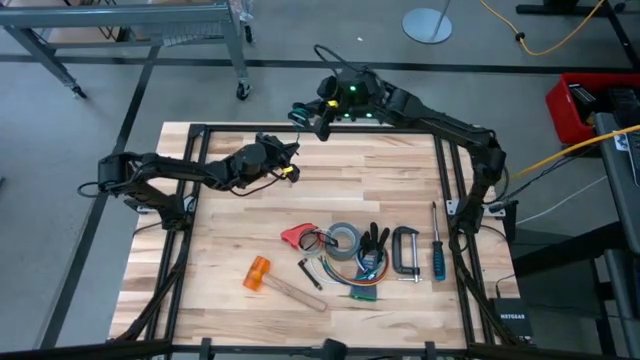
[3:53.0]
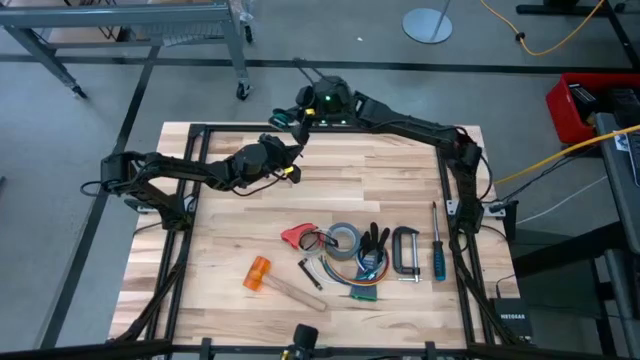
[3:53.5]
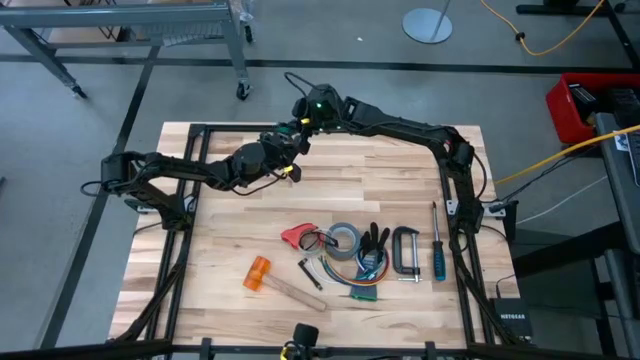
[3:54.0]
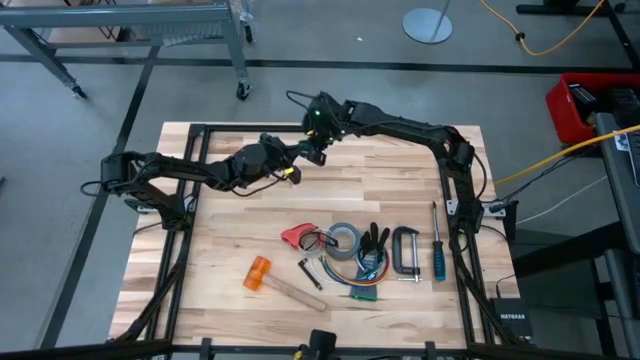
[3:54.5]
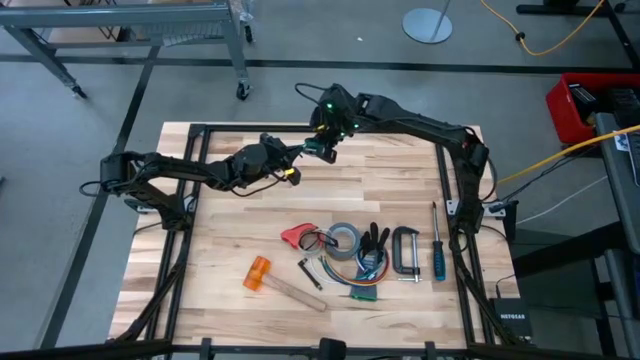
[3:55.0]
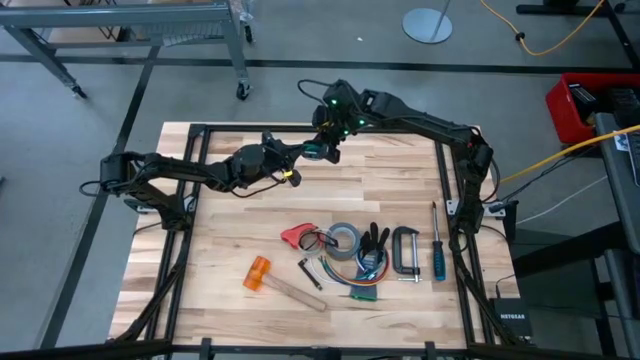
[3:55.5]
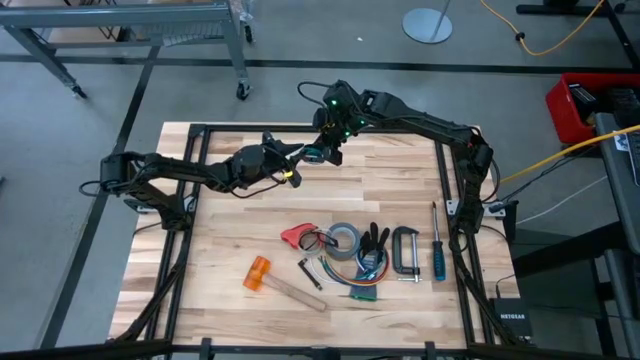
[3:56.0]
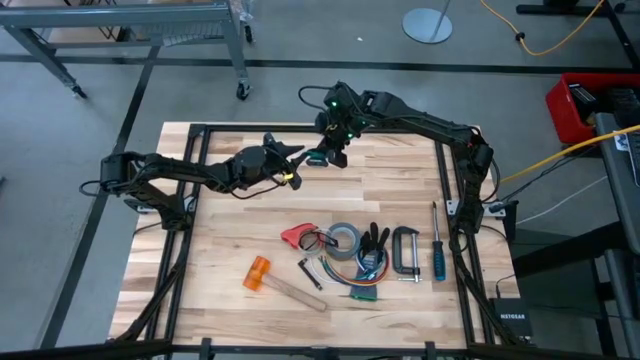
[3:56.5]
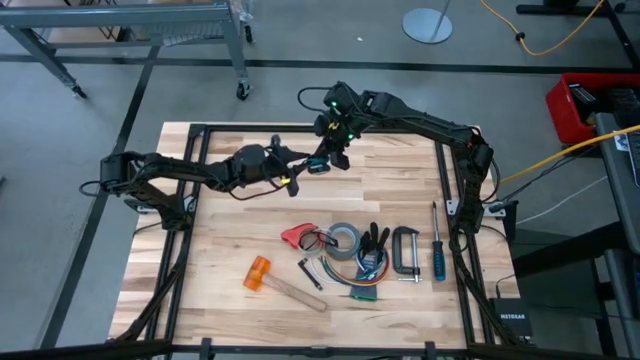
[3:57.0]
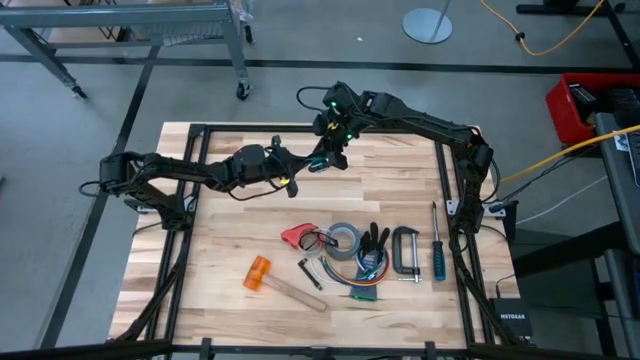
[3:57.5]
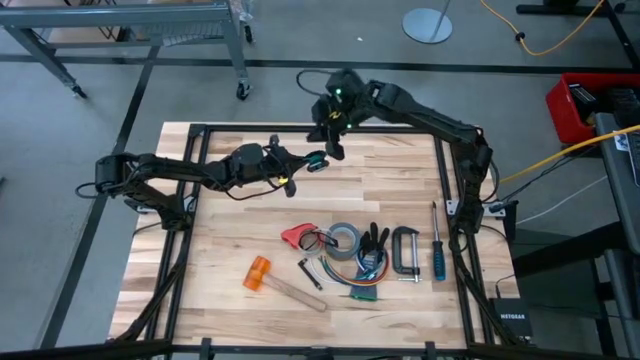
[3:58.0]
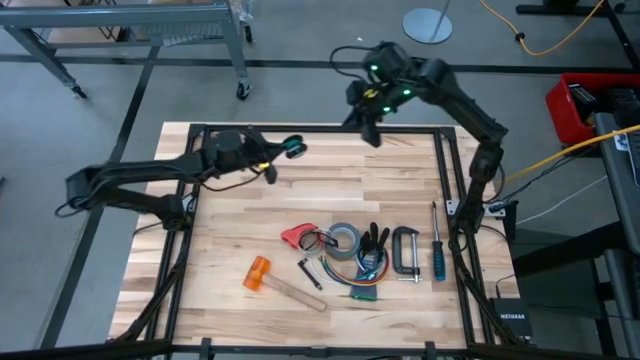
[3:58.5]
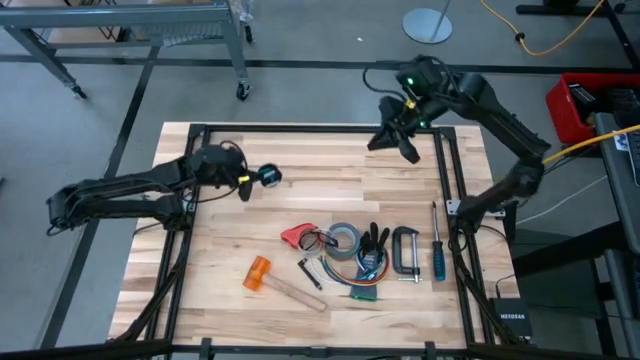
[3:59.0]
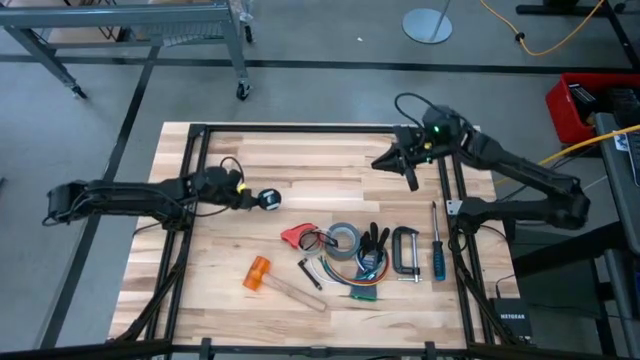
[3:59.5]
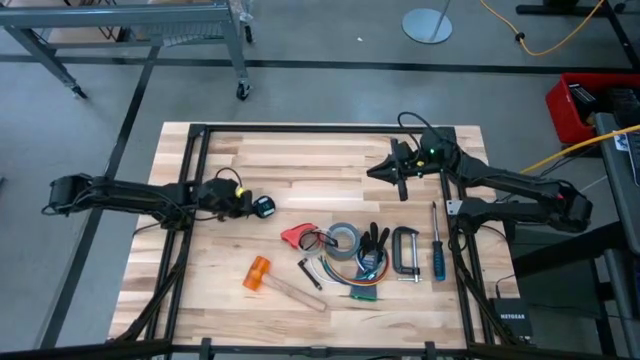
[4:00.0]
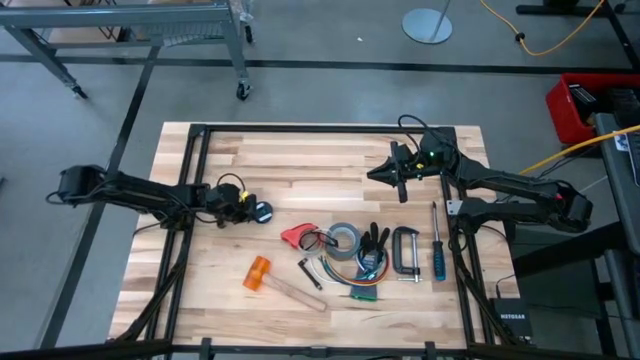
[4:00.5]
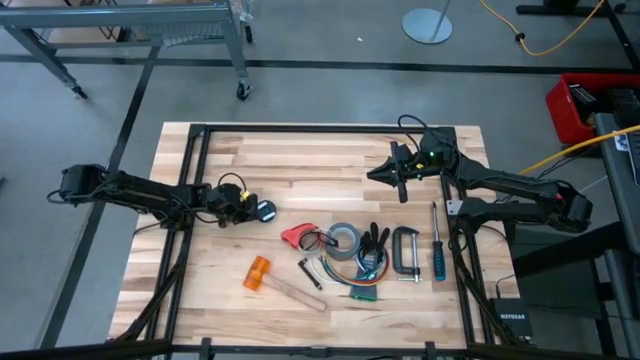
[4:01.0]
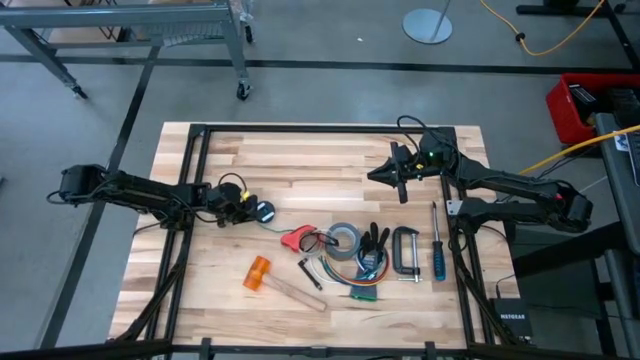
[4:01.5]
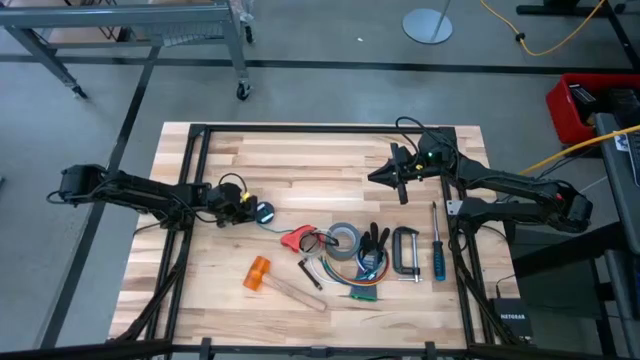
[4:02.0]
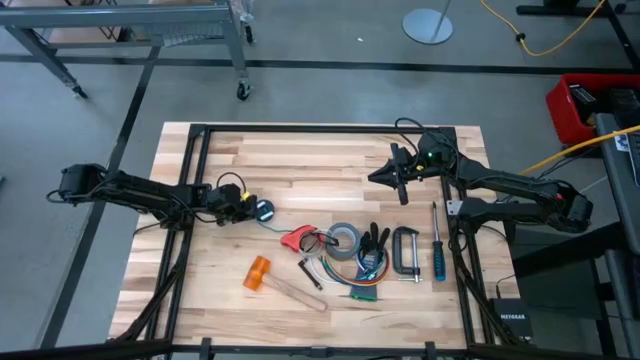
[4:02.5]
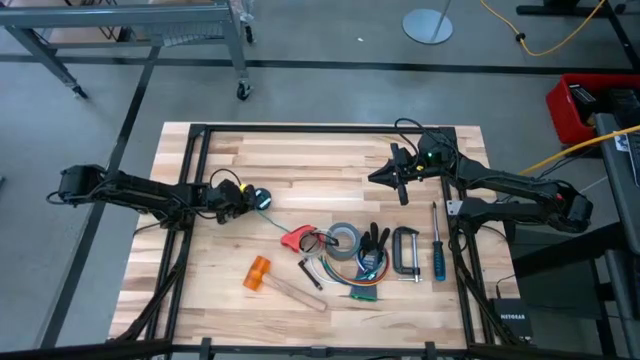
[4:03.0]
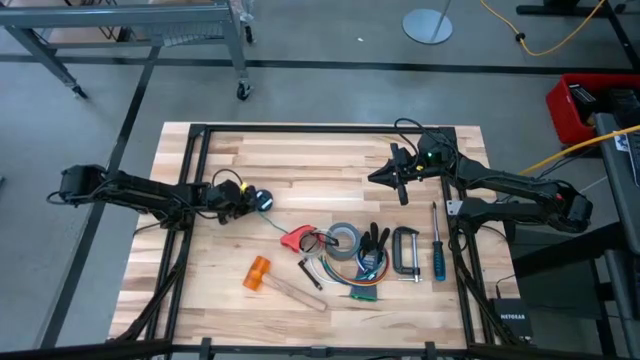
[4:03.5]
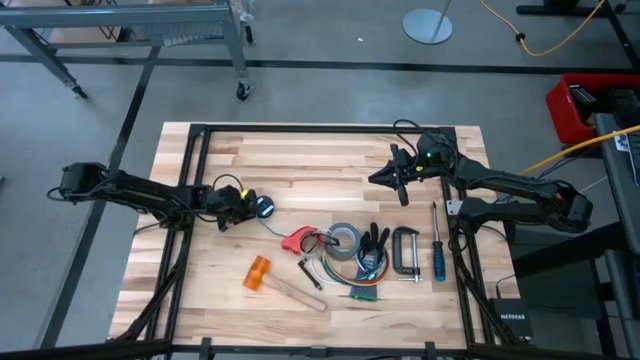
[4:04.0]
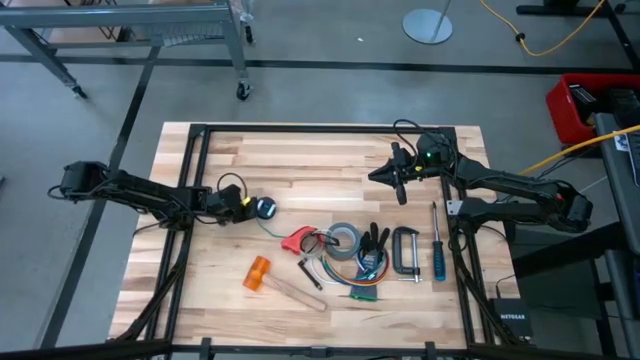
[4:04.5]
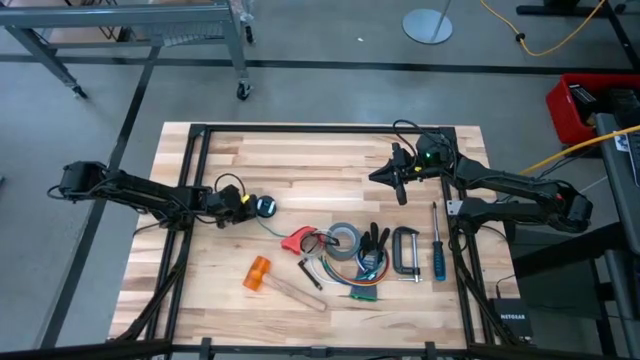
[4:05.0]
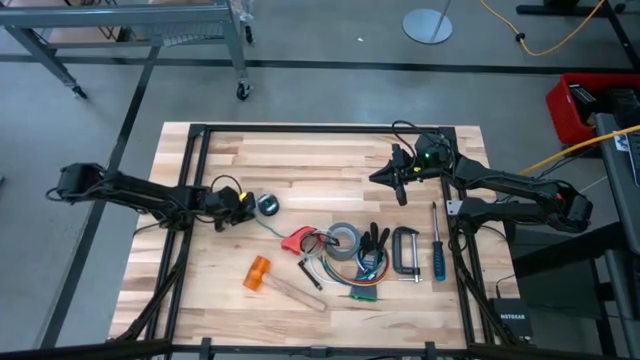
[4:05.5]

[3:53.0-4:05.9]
Task: Coil cords
Coil the green cable wire on the black spool

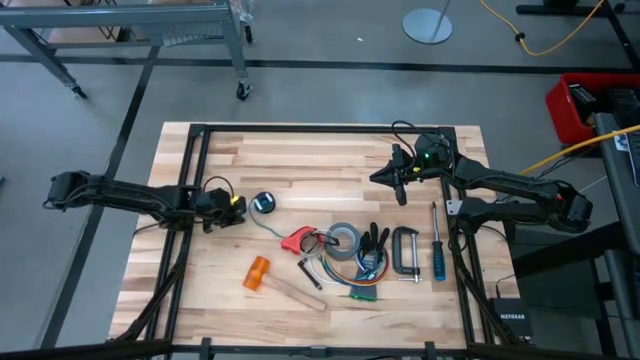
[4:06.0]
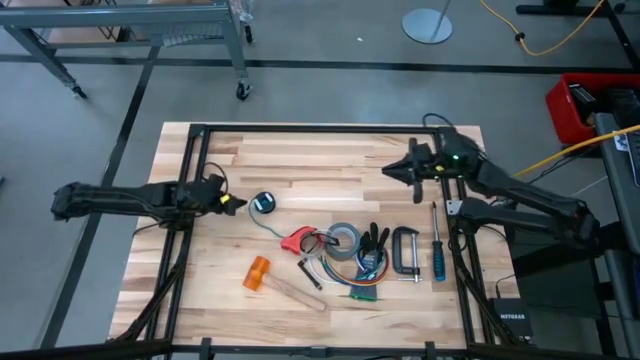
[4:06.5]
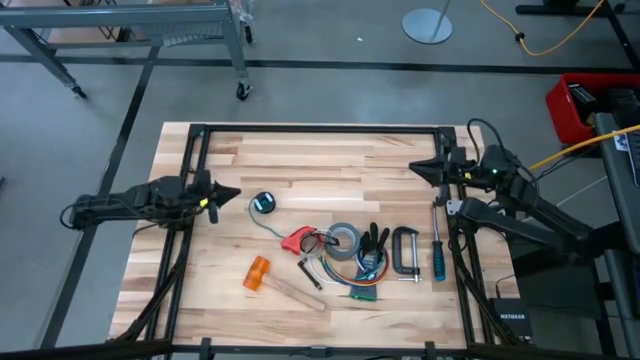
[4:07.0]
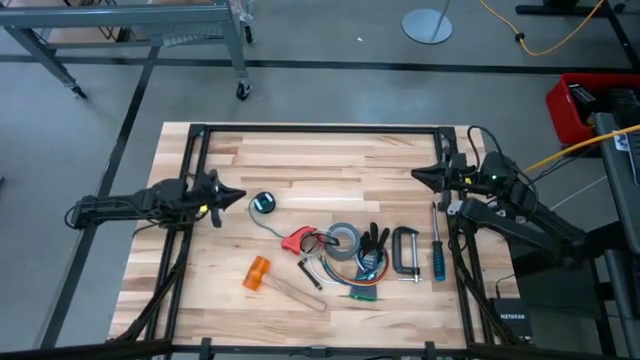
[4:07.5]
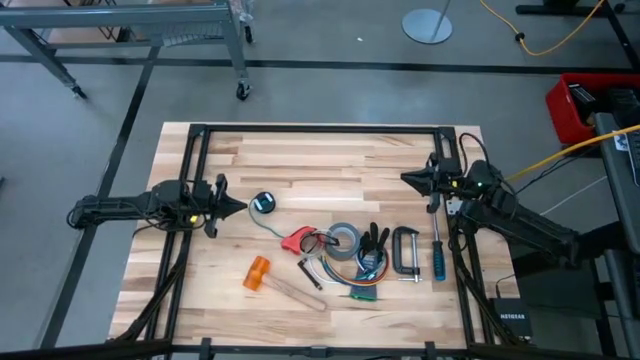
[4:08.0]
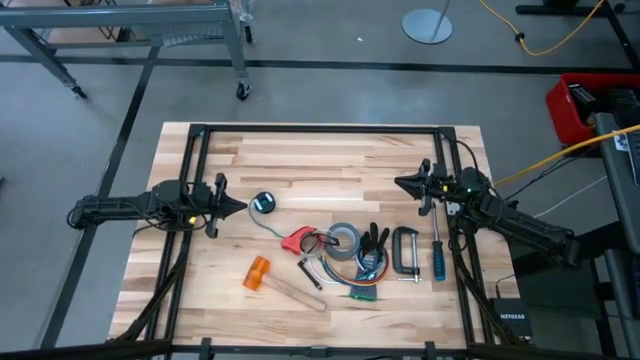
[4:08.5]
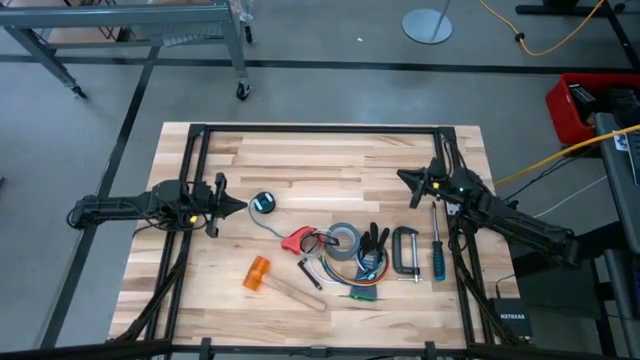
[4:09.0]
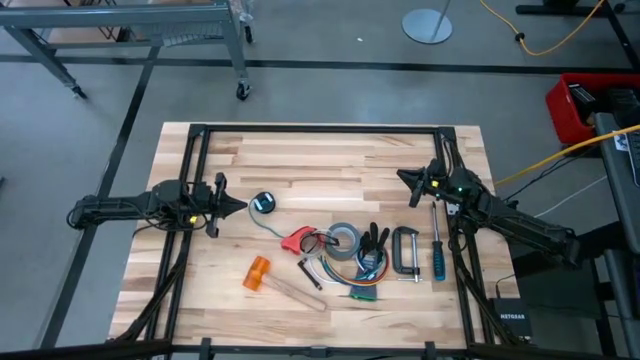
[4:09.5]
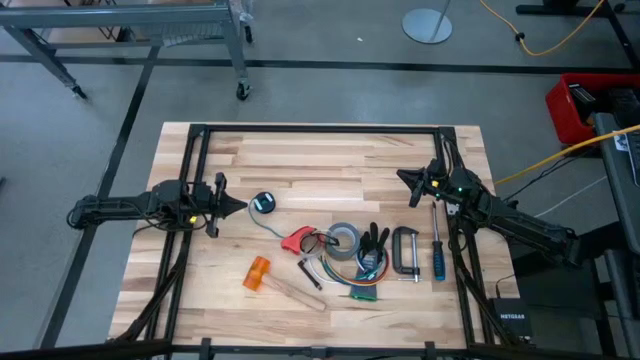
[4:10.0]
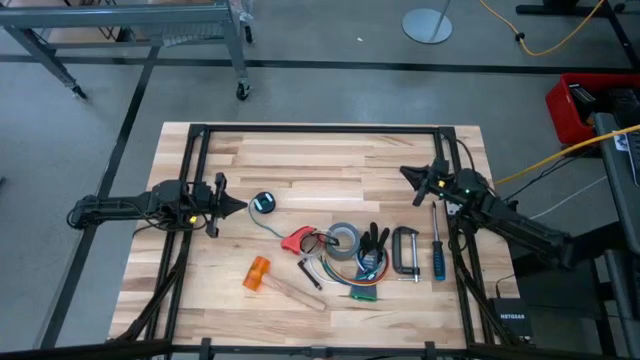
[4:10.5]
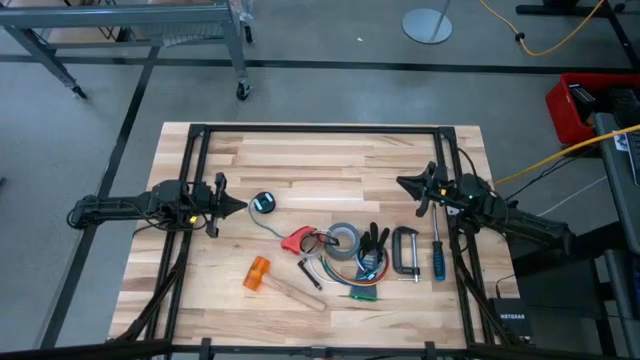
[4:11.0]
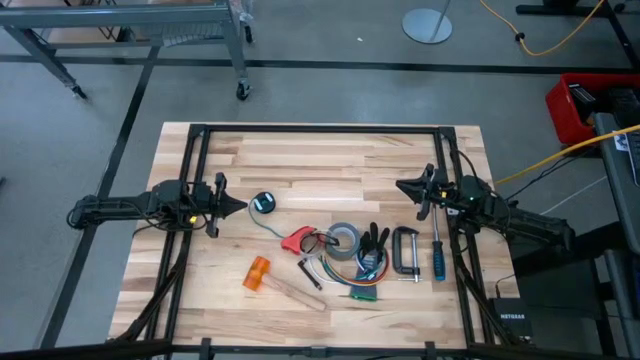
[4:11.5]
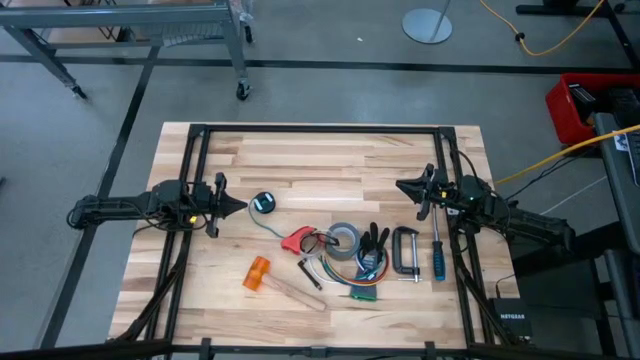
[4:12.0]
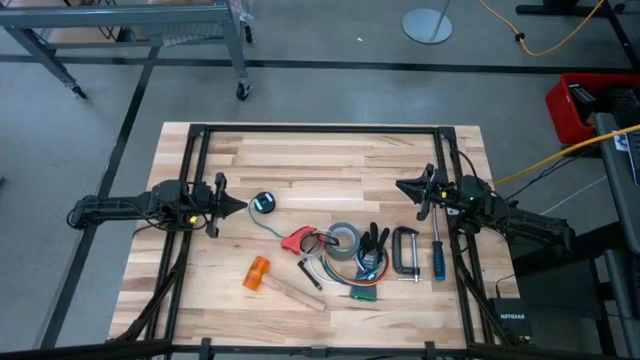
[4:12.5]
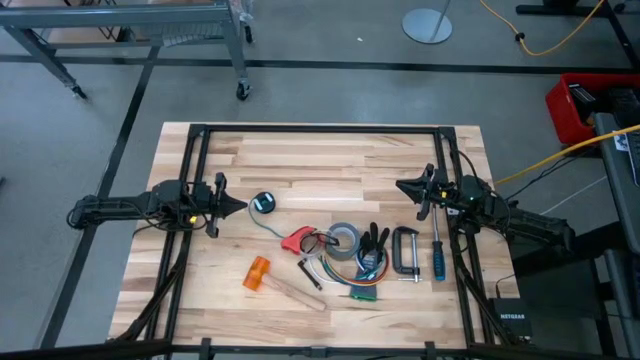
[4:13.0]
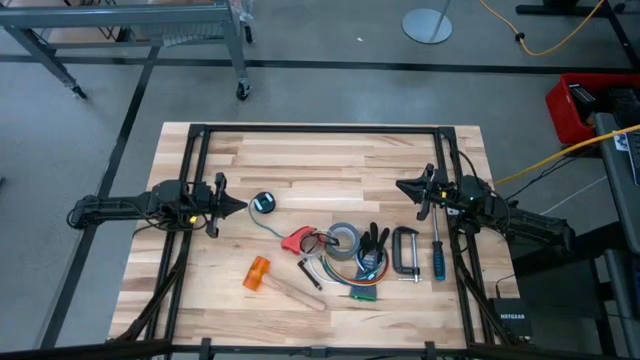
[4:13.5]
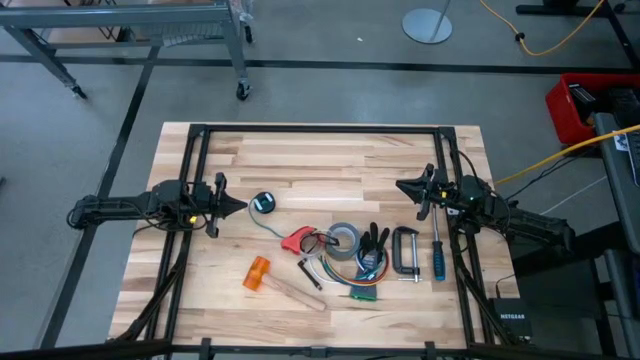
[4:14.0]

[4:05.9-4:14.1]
Return to Home Position

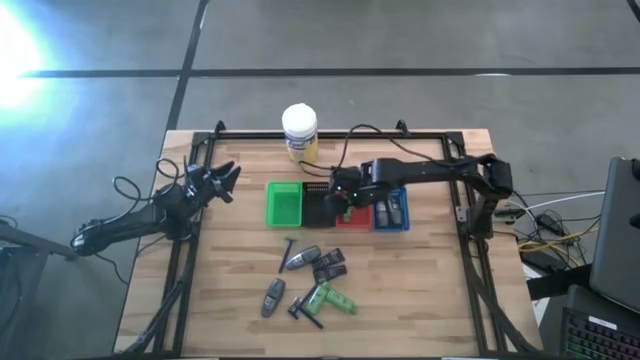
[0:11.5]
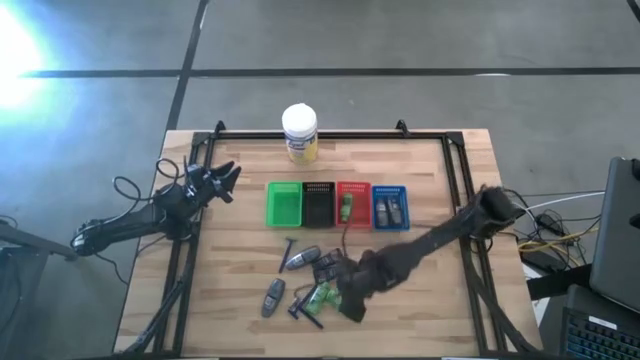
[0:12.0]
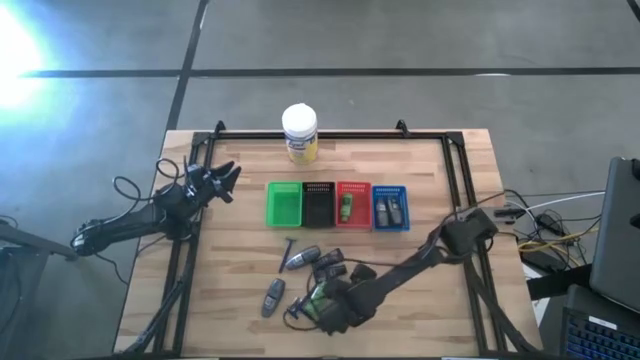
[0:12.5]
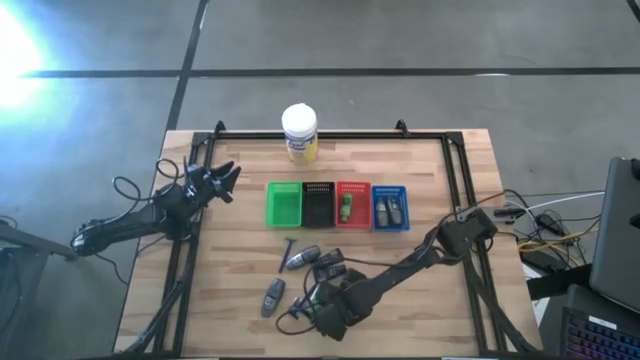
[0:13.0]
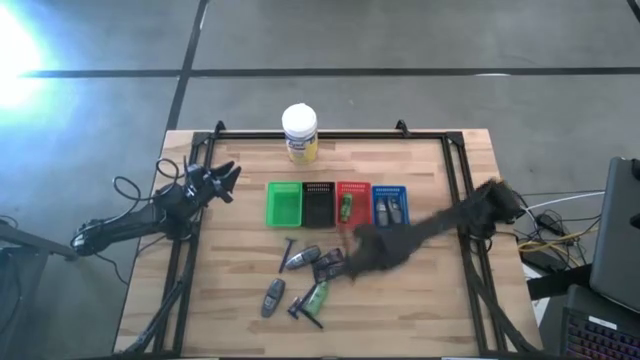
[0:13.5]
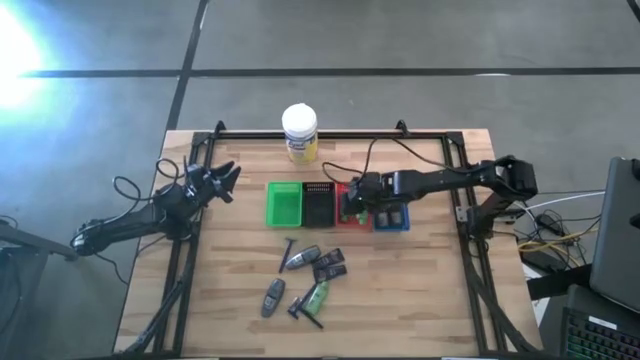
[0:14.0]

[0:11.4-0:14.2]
Task: Pick & Place Travel size toiletries
Put the green shampoo into the red bin
